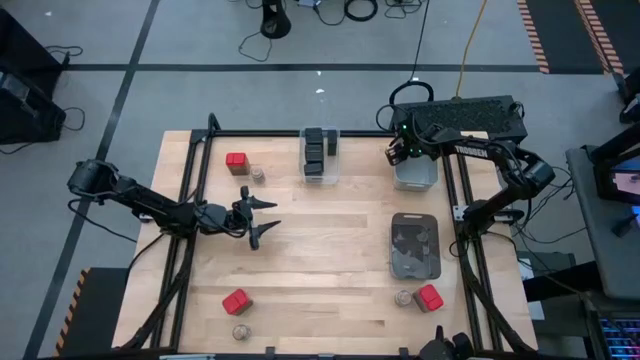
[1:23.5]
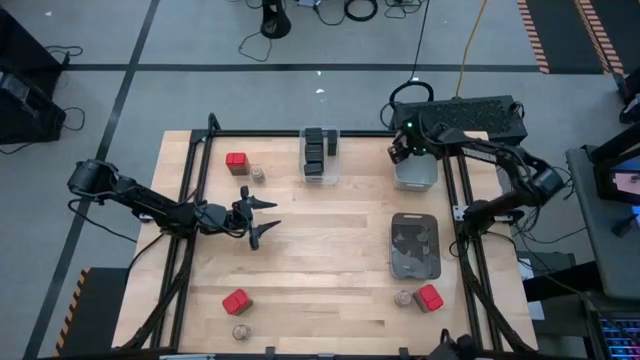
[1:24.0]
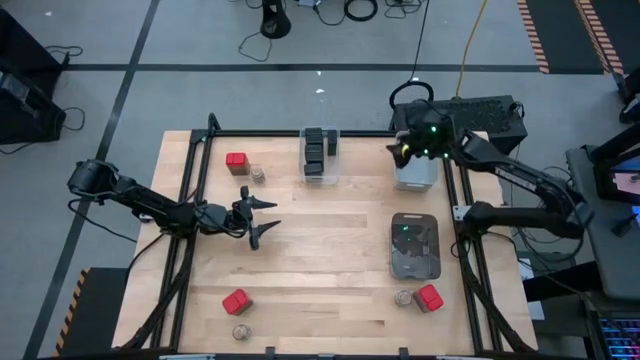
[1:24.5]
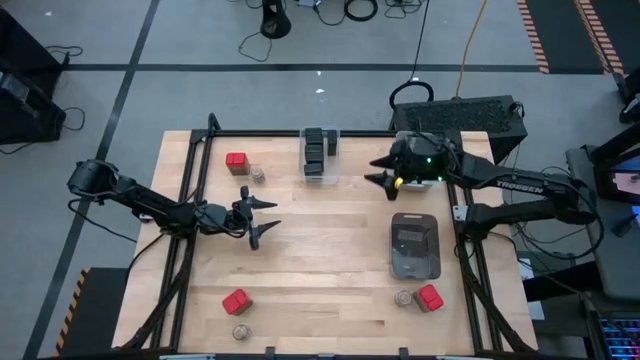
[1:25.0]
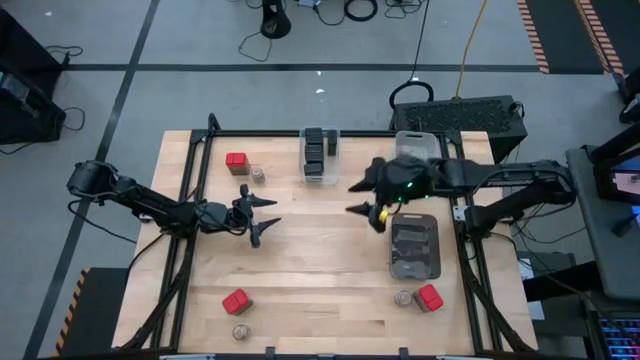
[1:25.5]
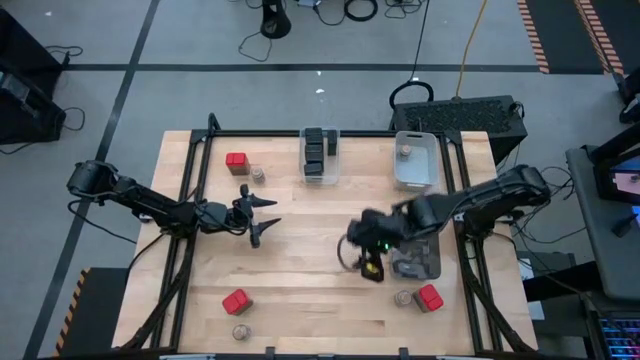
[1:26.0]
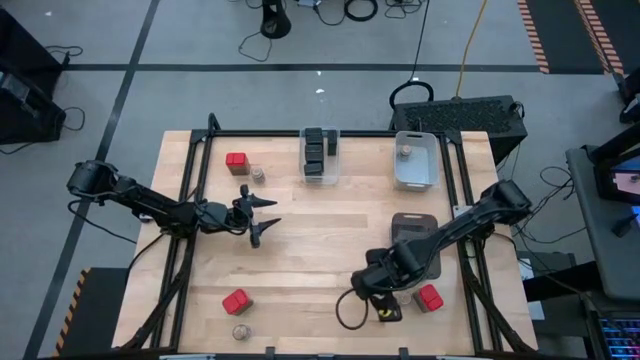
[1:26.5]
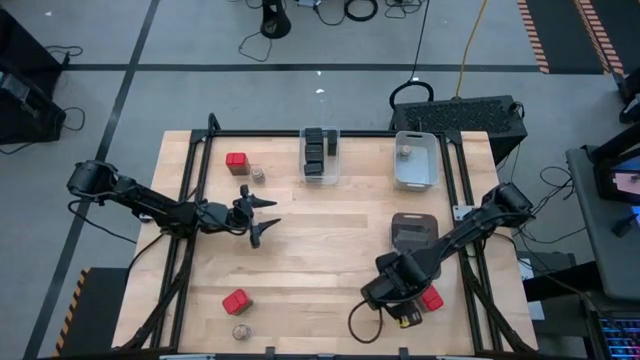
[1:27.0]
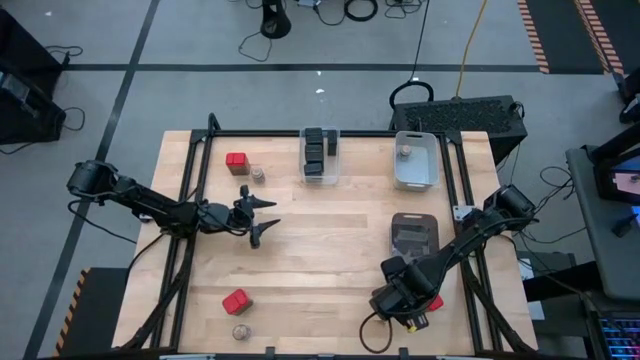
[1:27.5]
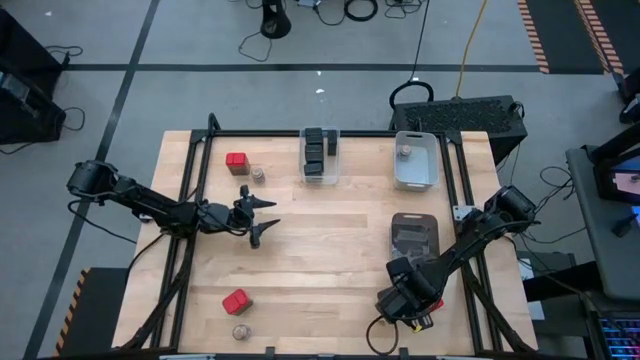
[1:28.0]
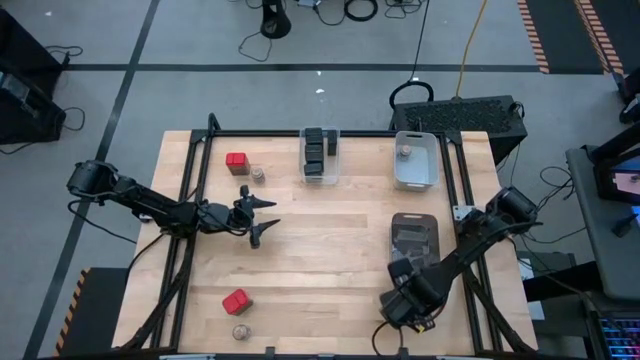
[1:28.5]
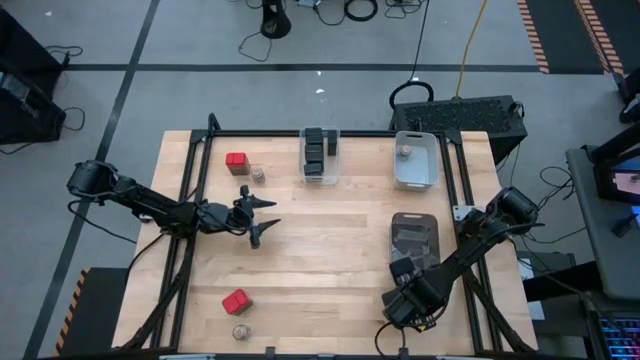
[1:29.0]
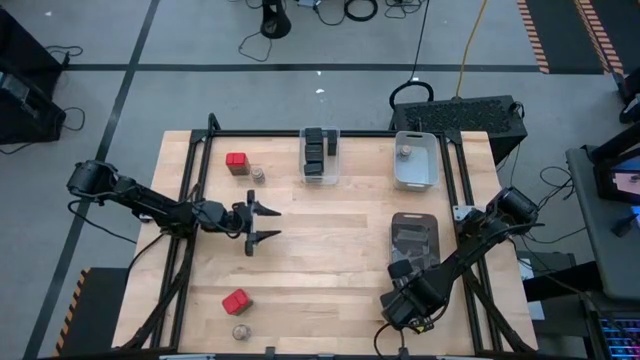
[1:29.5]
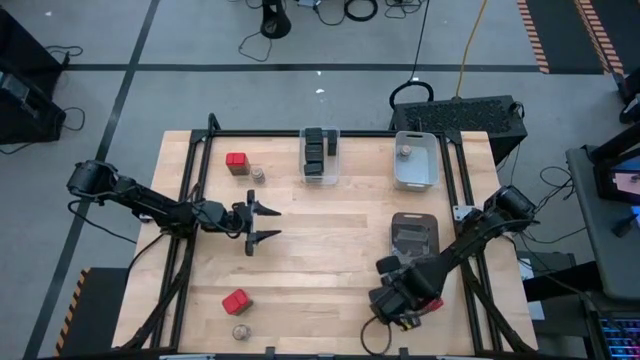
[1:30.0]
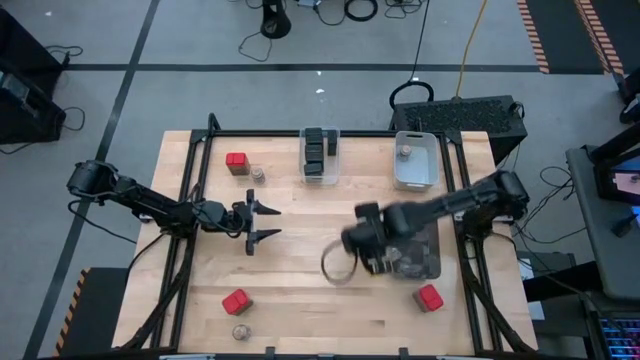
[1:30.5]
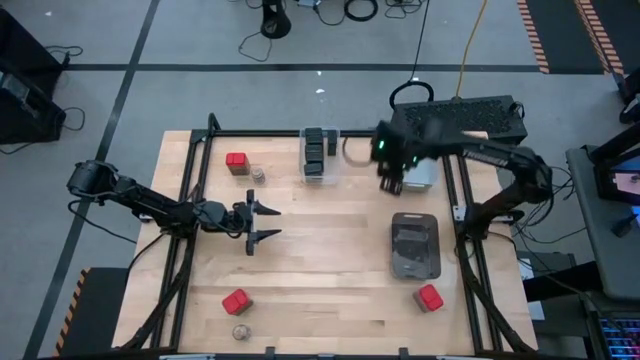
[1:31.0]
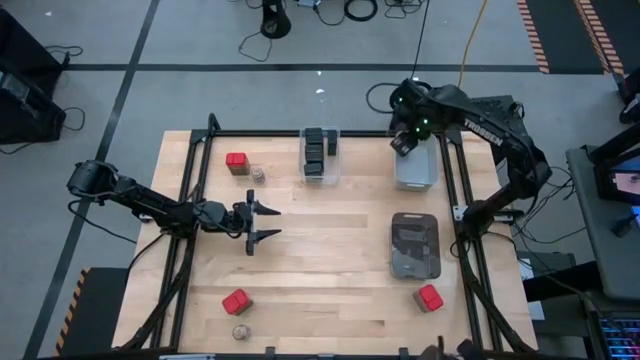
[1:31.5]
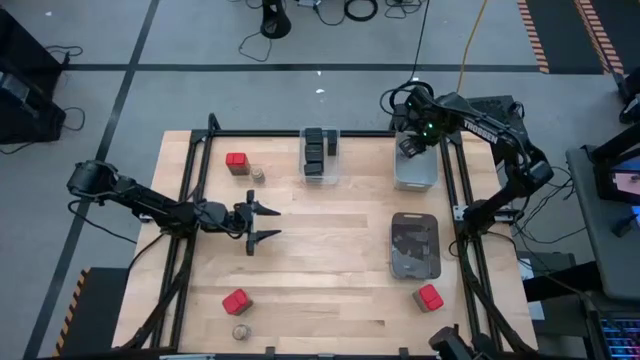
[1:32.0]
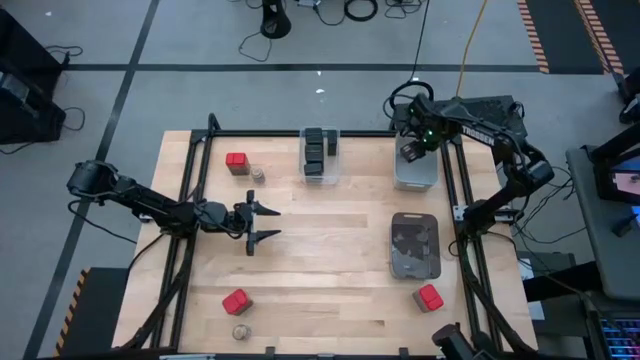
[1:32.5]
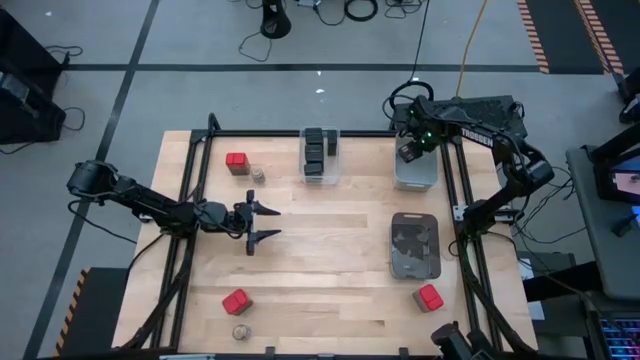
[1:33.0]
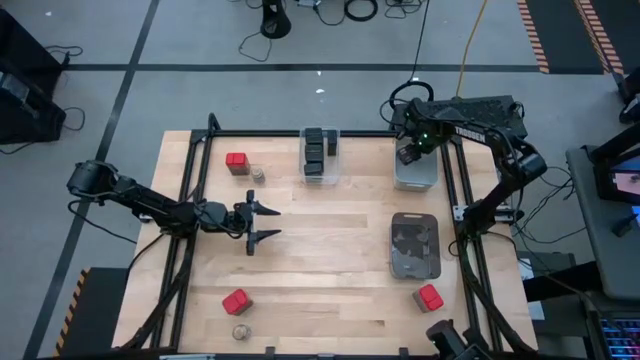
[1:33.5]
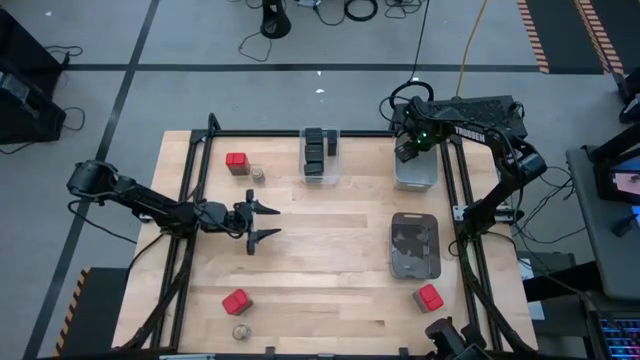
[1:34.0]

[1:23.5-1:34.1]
Task: Sort spices by type
Put the top right transparent seasoning bottle into the gray bin

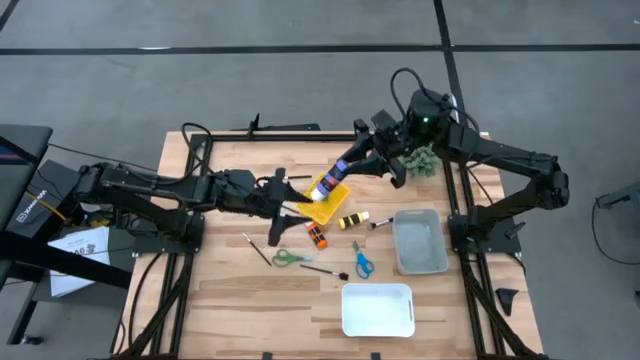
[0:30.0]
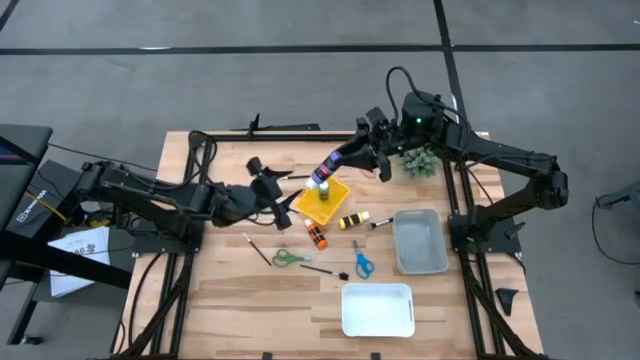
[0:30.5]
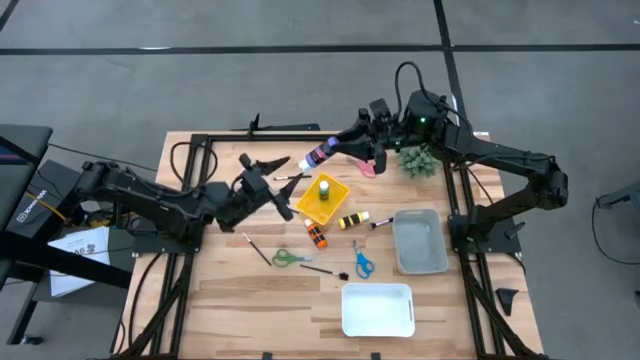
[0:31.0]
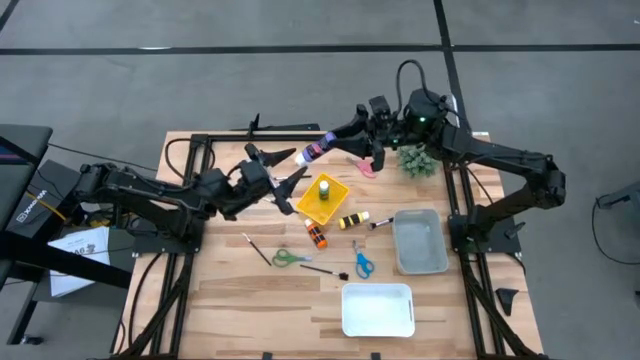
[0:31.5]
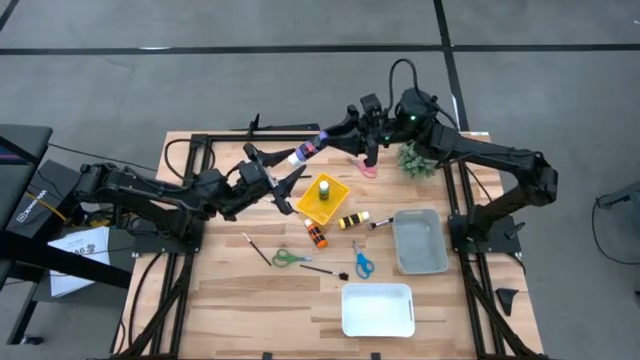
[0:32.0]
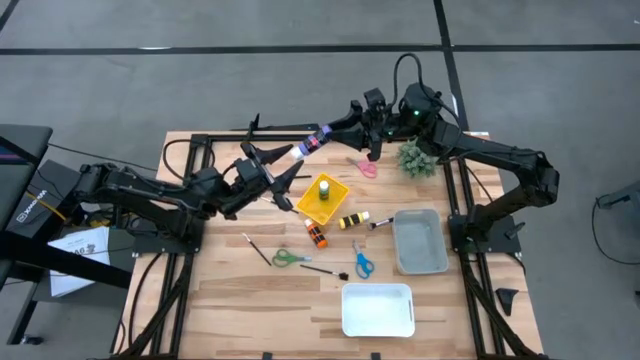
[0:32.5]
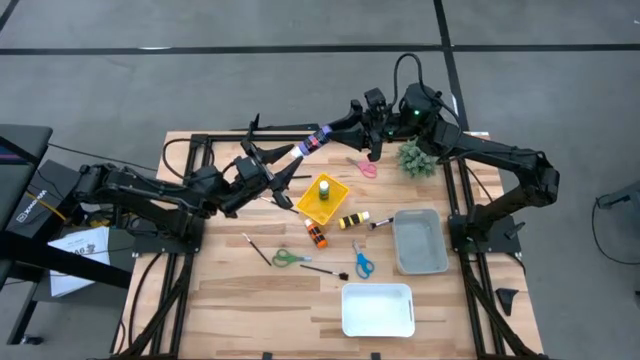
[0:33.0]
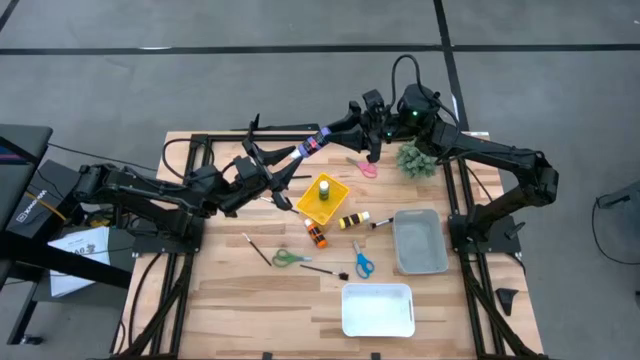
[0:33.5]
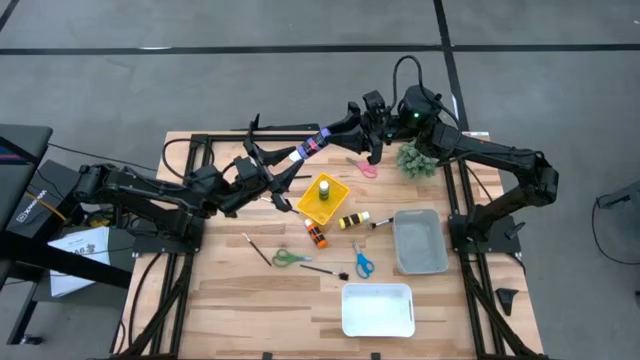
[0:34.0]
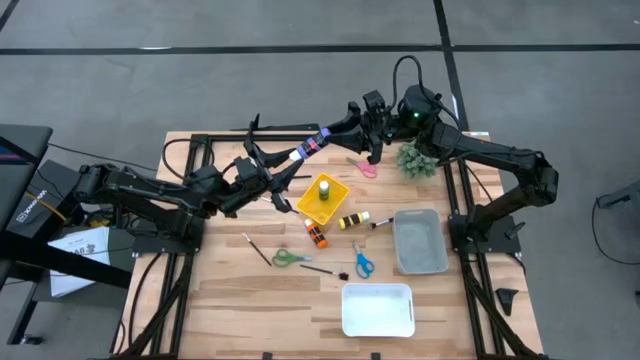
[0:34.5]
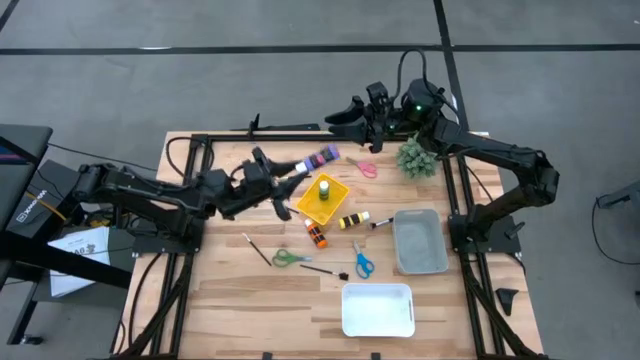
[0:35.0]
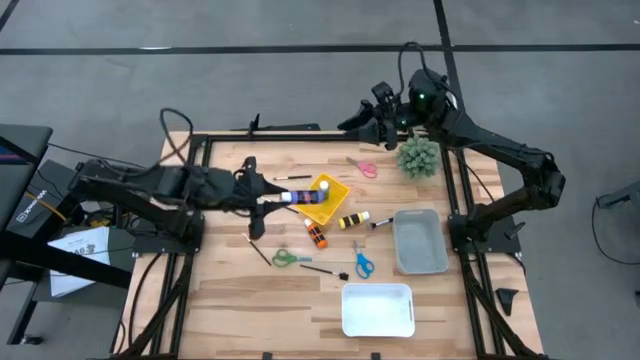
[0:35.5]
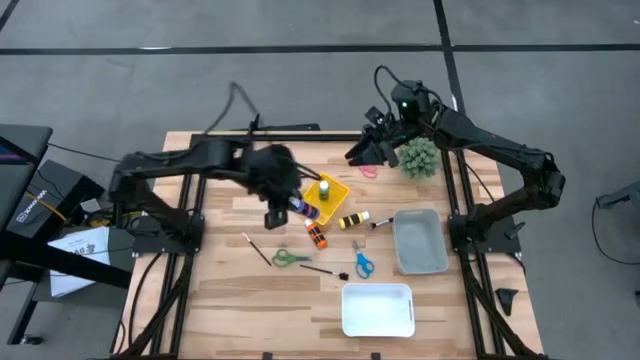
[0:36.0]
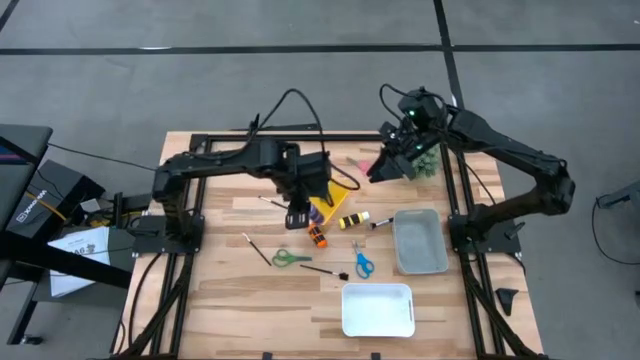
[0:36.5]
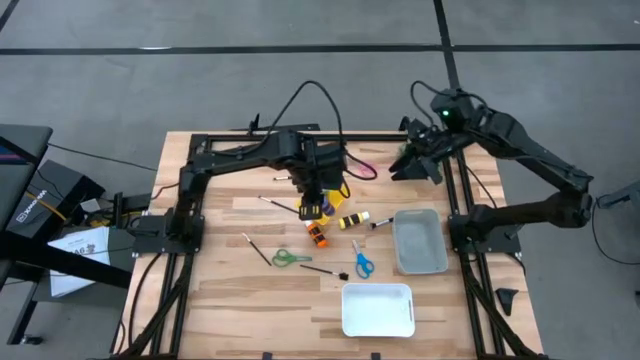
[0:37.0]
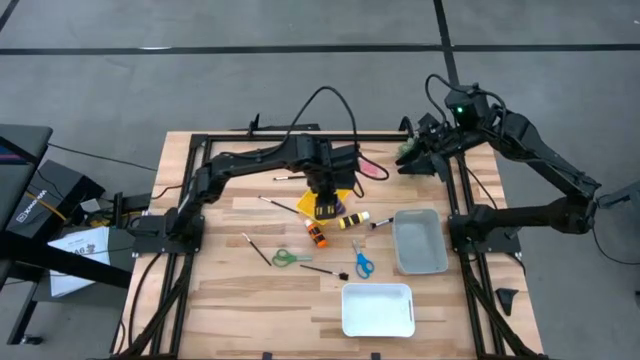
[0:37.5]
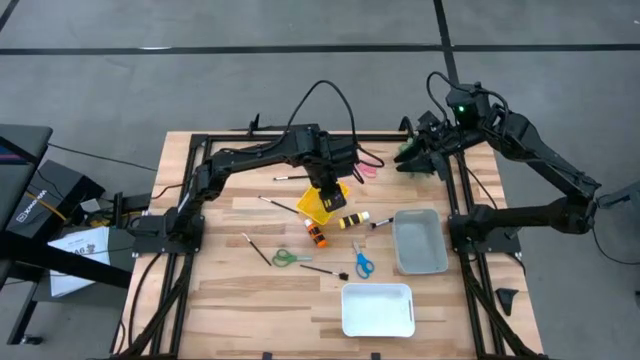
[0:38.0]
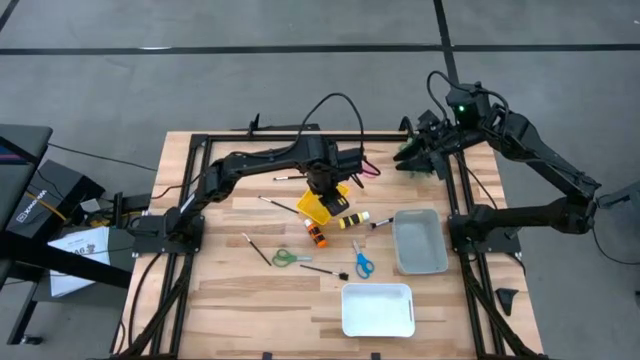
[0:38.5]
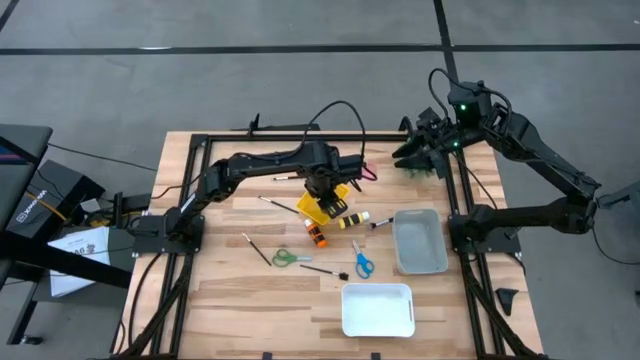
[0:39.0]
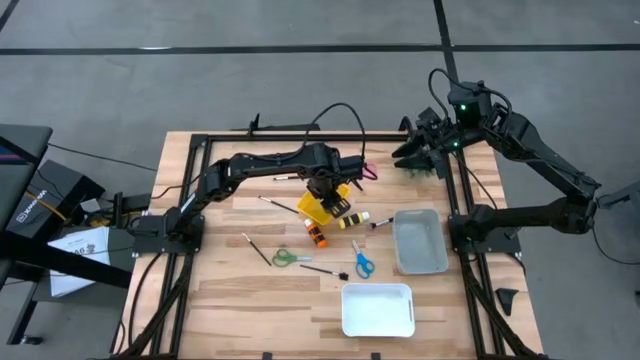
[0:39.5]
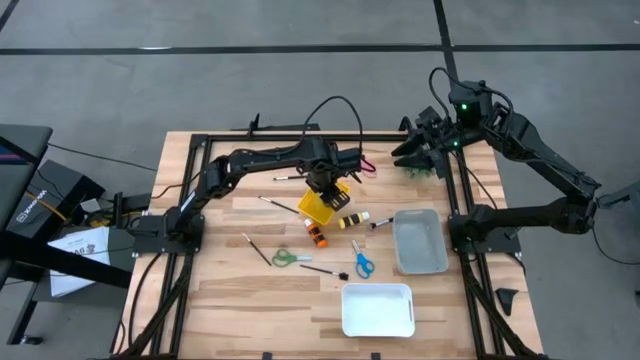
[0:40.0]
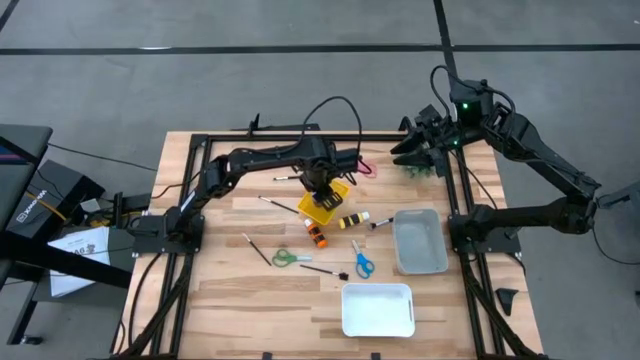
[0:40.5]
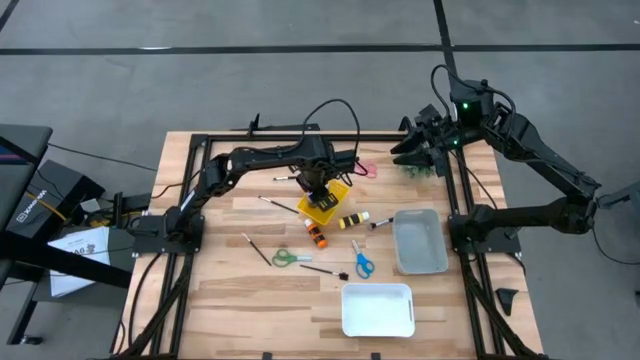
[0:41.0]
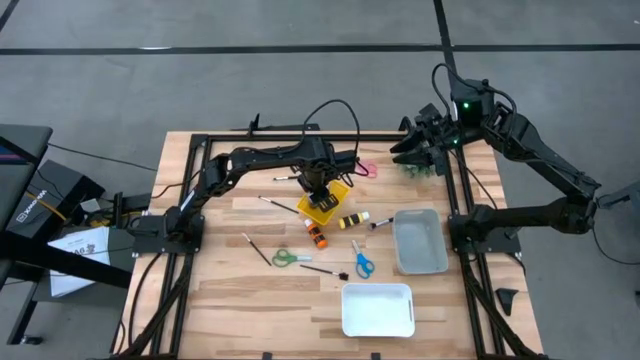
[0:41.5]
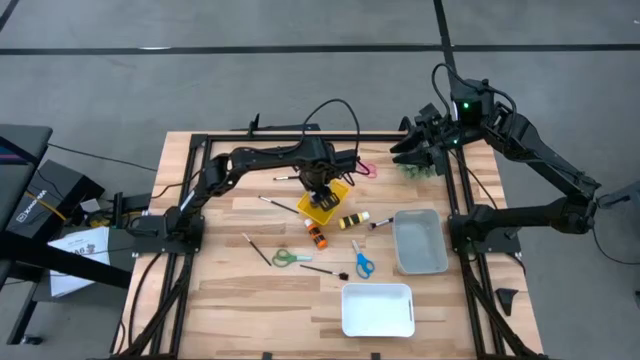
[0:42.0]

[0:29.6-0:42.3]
Task: Pick & Place Paint Supplies
Put the violet paint bottle into the yellow bin
